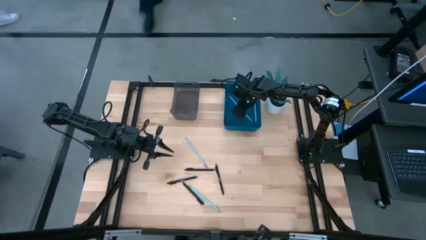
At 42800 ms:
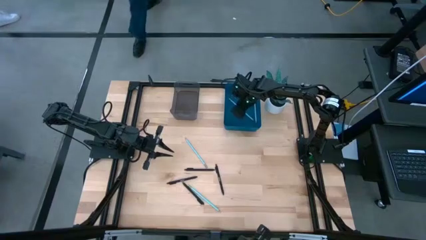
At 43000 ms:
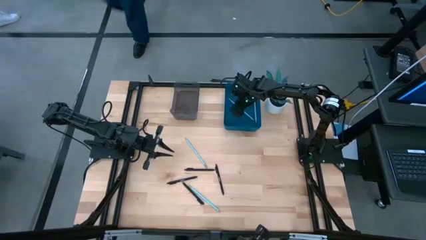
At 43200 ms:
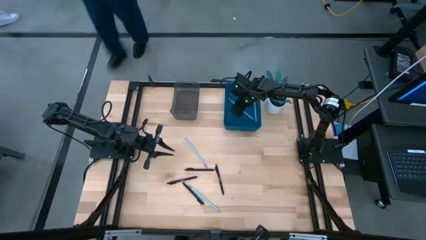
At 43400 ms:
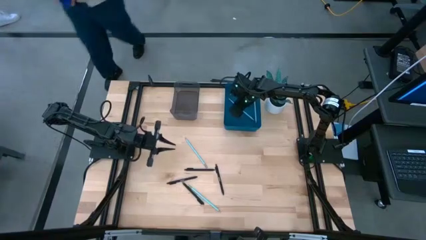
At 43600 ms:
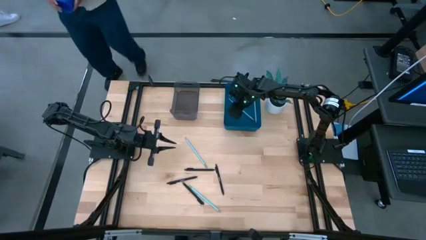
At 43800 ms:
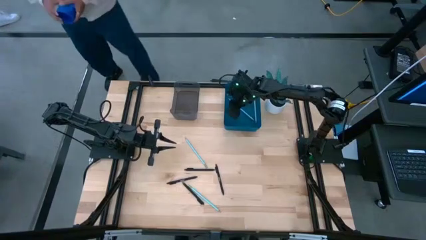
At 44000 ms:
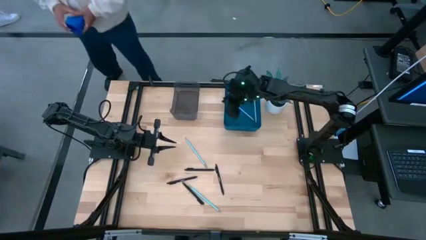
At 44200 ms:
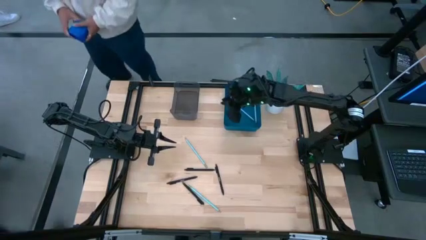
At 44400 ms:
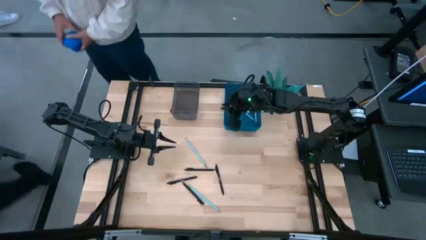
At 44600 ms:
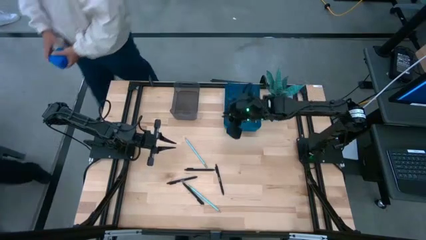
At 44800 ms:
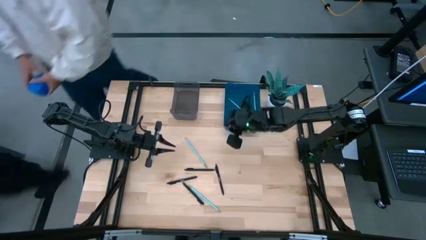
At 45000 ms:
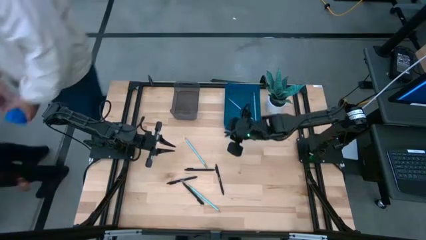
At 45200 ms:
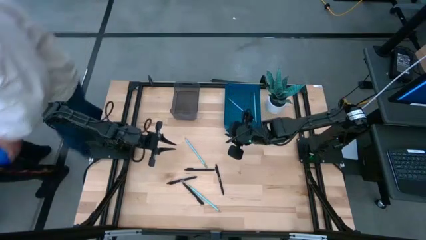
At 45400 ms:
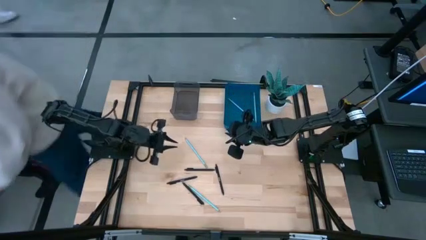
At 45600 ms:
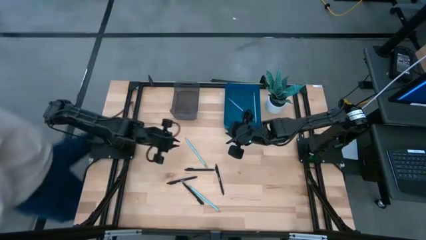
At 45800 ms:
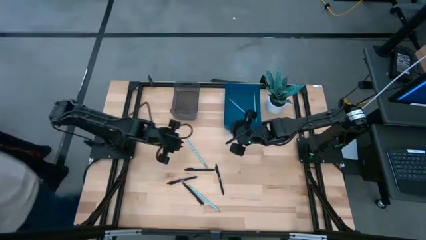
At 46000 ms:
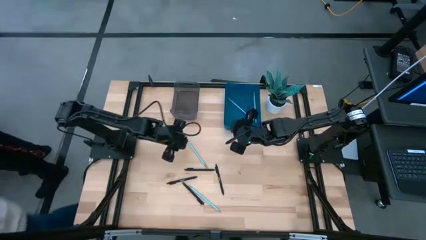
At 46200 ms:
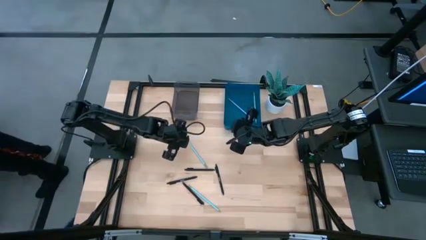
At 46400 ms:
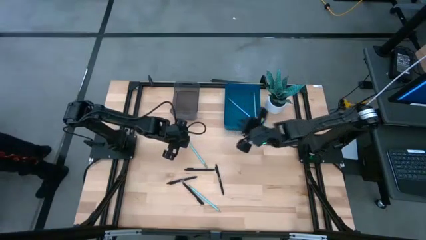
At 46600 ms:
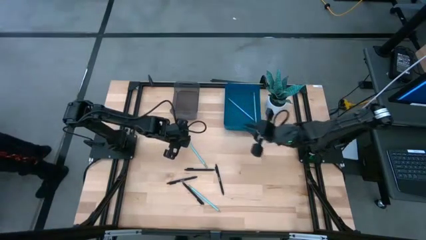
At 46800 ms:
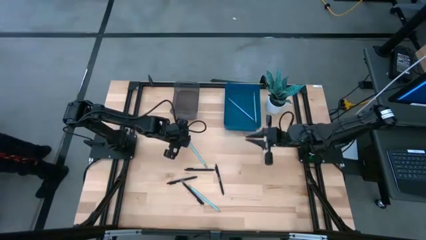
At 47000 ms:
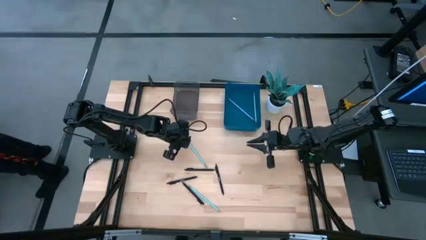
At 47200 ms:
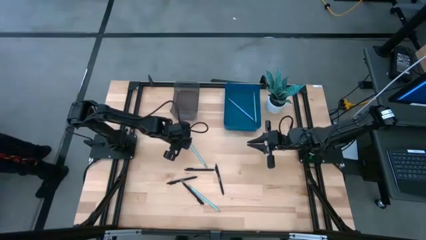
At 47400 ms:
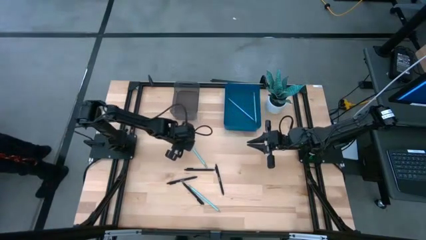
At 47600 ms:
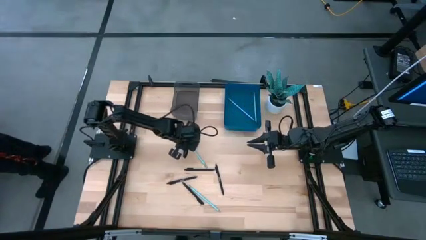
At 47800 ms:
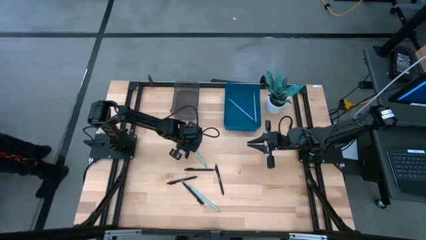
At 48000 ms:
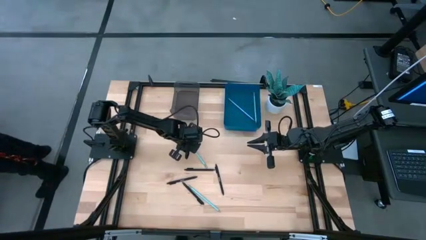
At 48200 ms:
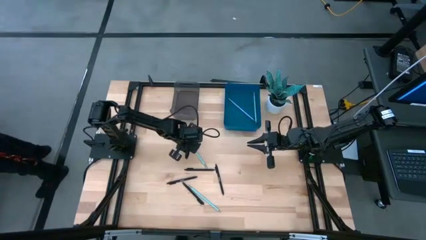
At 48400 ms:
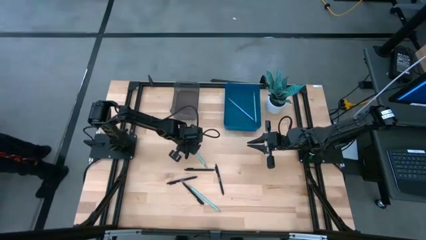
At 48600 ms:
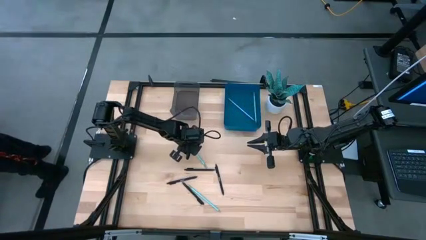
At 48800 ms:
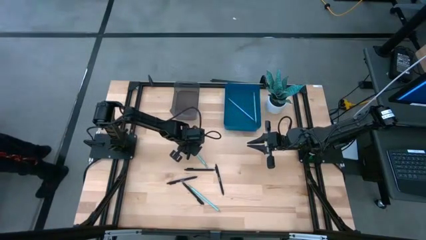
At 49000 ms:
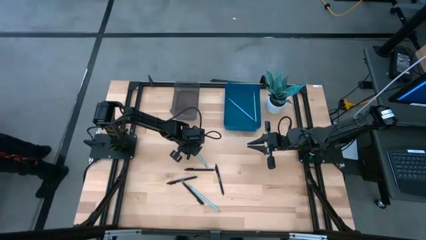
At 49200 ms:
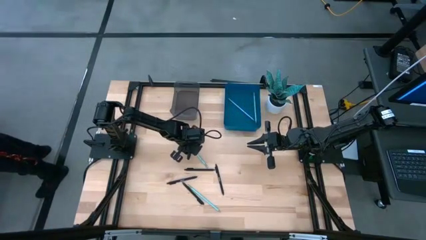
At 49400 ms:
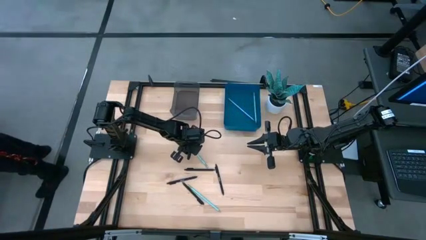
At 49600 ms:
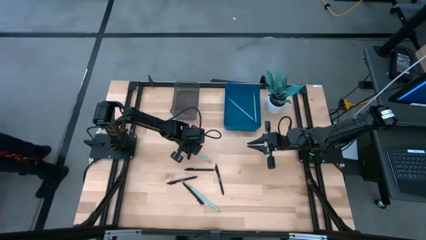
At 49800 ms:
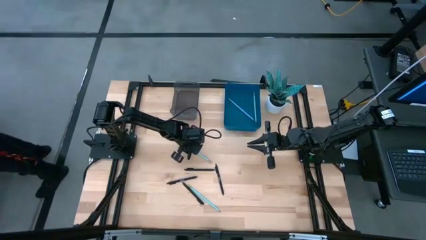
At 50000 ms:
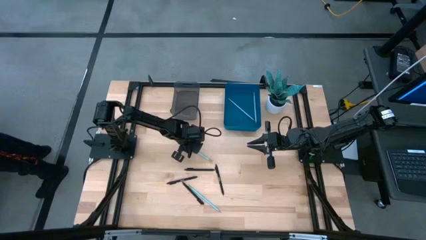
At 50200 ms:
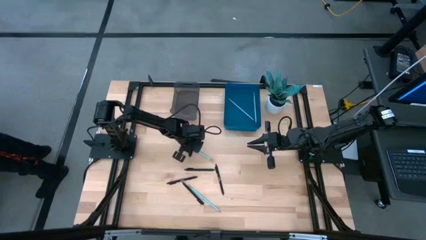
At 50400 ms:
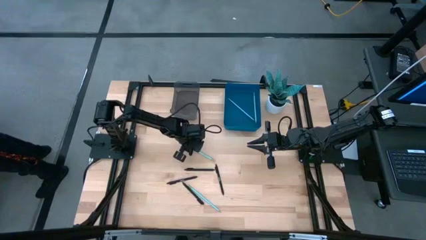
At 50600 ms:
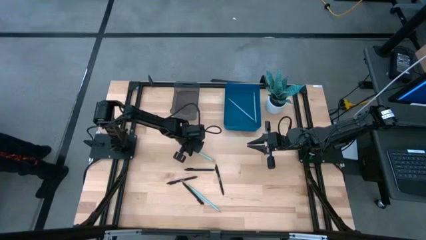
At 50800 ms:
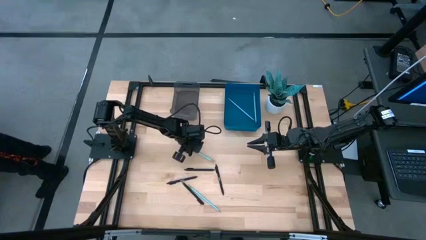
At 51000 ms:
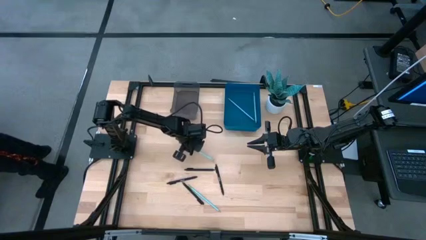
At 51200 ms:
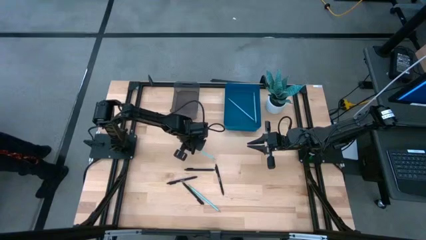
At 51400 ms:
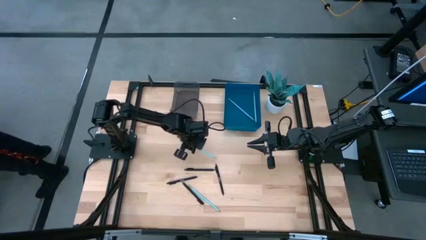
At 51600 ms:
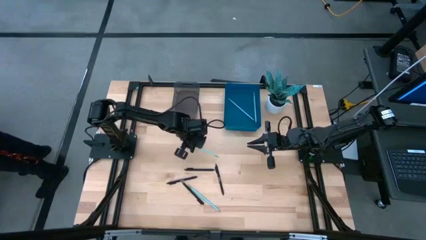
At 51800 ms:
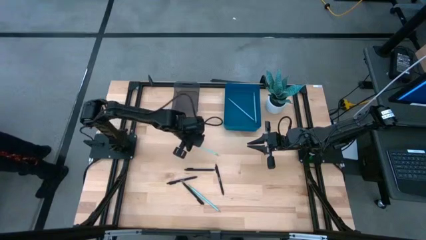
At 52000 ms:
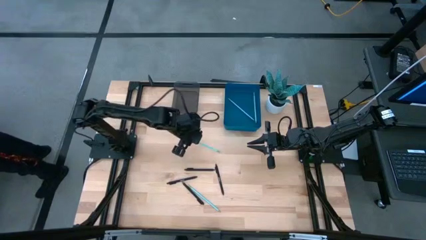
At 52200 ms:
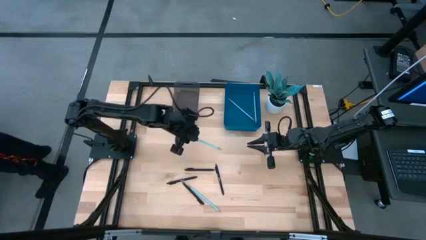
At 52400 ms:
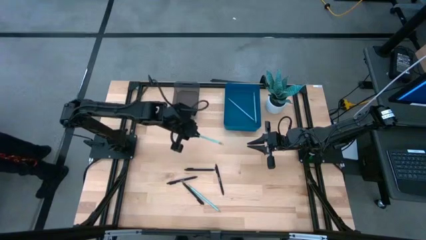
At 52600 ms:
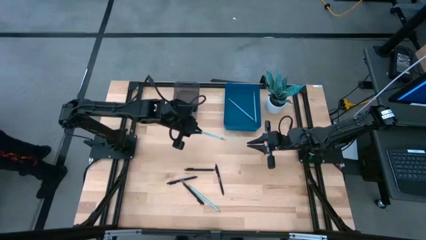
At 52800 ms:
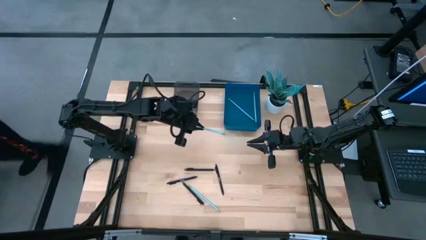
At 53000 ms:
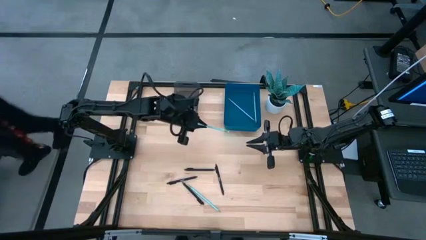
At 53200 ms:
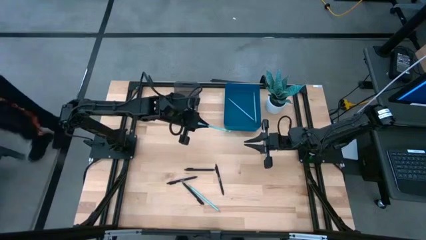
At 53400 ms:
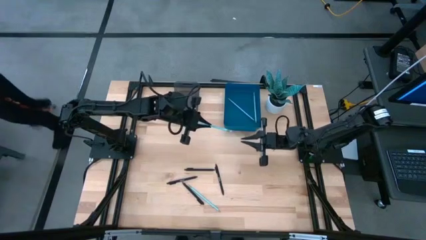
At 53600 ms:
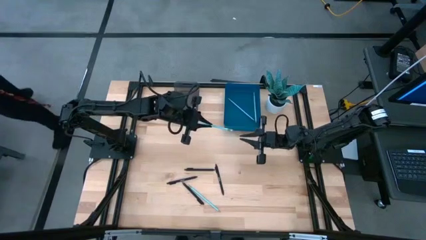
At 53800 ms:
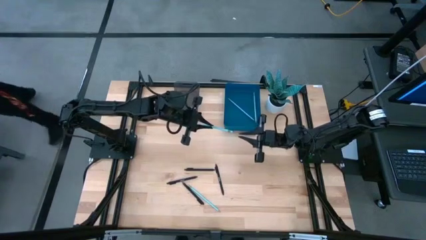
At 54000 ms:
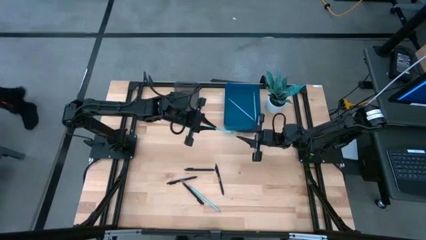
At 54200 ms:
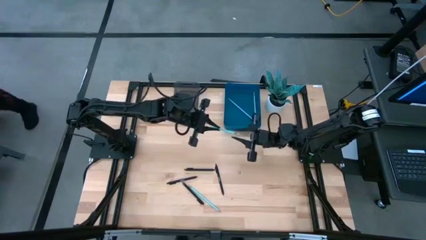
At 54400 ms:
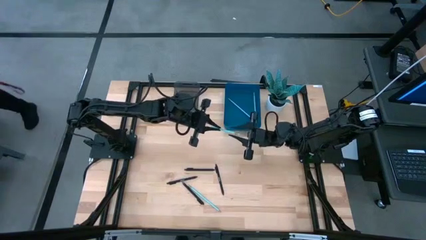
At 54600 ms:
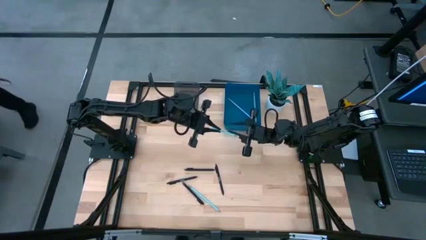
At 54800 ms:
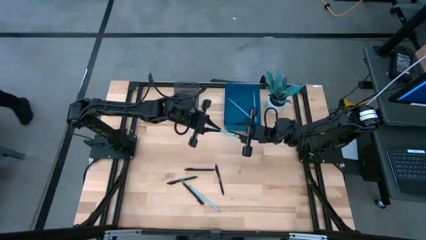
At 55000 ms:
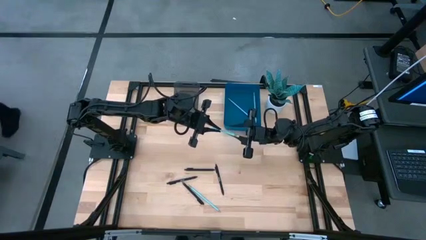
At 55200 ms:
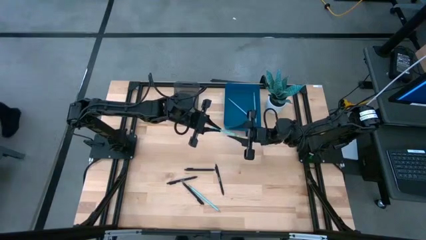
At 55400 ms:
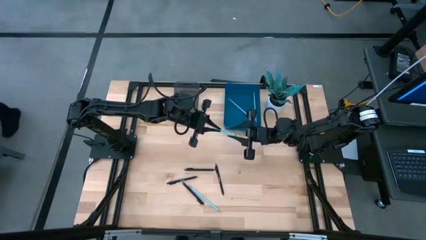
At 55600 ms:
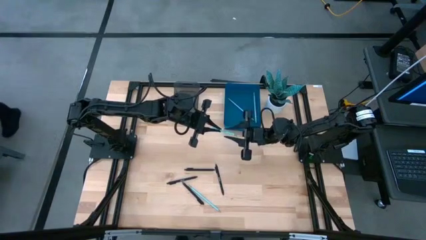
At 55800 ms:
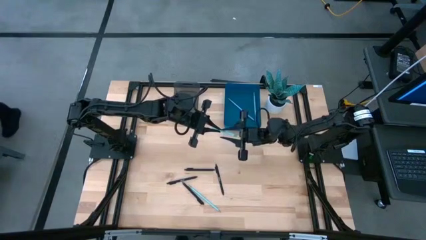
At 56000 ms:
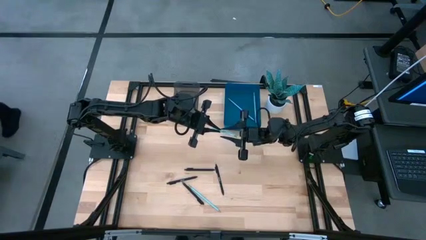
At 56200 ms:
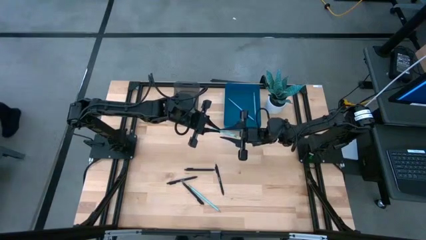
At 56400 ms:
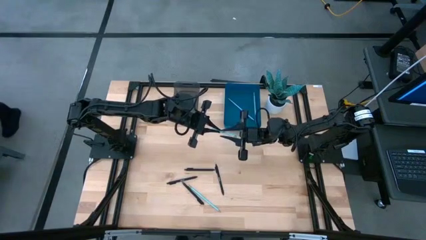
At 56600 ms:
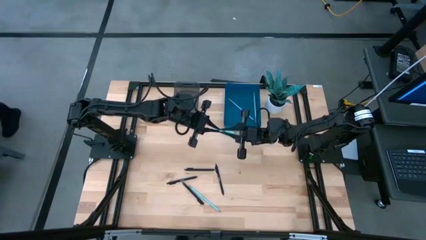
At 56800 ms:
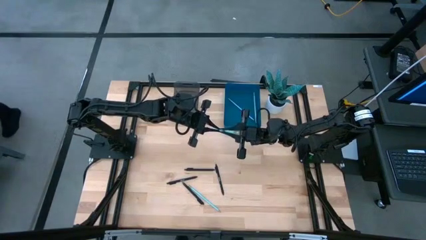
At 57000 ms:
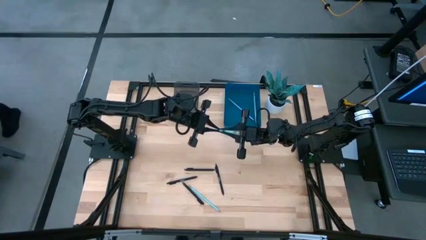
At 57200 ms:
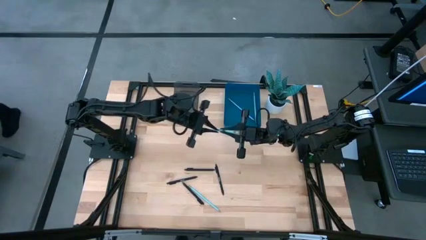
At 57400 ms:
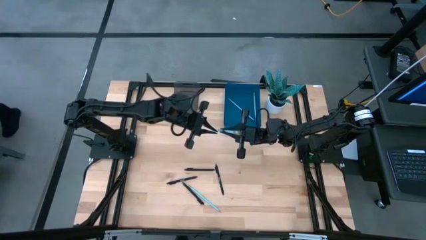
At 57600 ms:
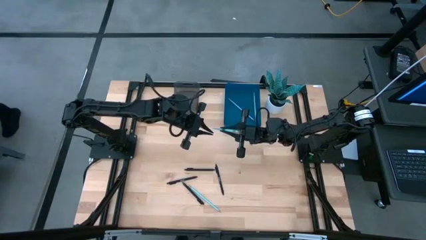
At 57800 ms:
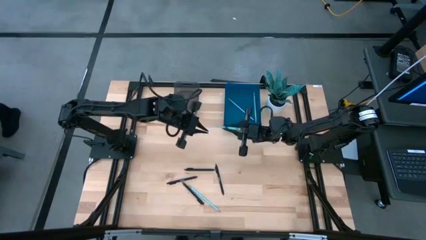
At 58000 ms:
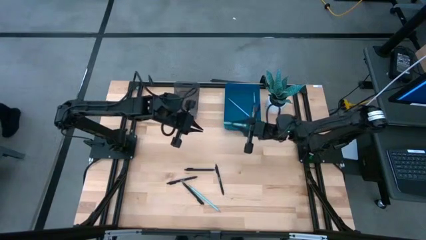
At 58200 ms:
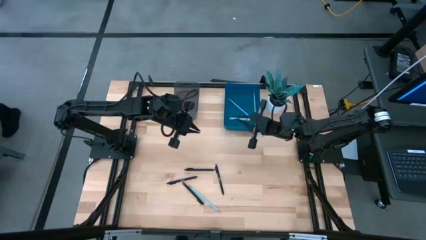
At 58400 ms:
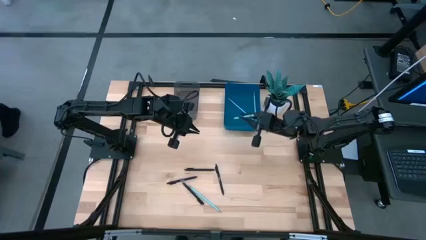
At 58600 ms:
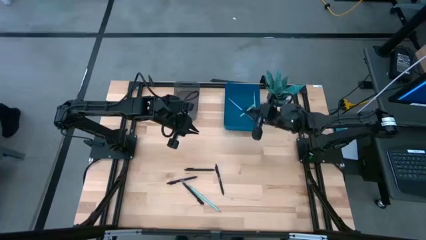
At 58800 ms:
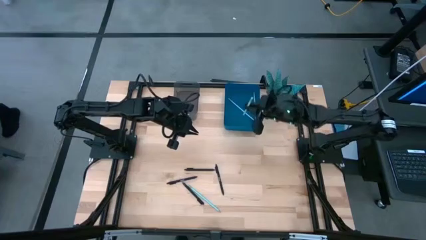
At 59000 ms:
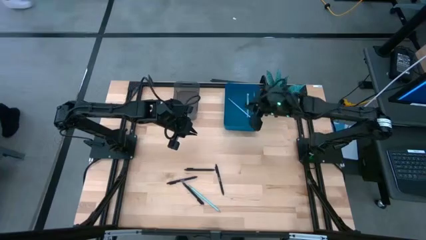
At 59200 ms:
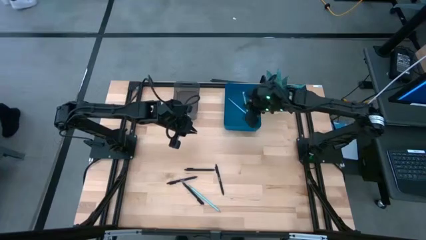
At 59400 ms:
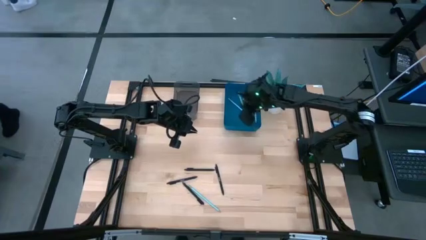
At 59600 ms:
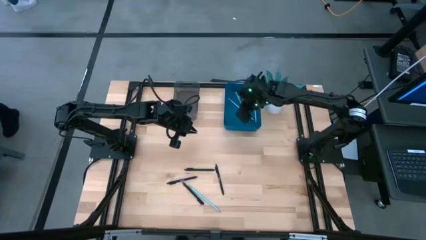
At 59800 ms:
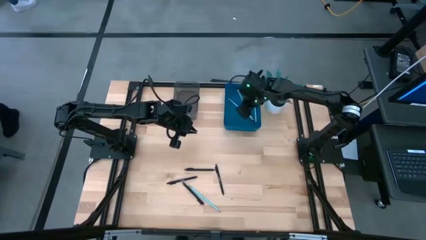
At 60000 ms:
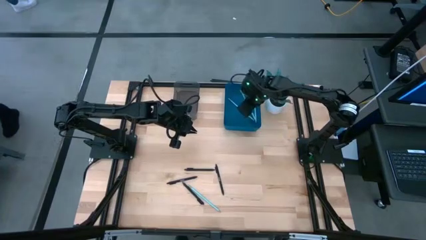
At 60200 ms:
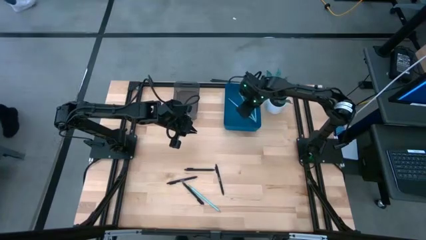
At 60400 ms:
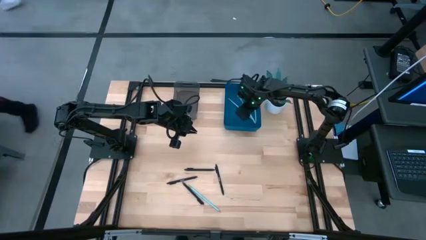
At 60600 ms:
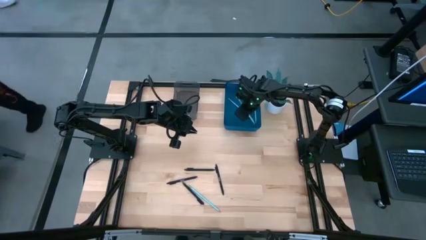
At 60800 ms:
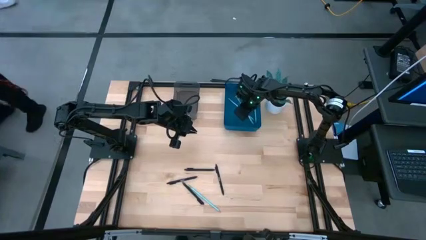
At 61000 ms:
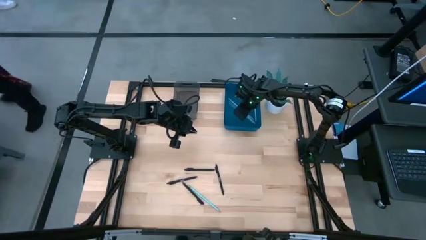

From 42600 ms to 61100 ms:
Task: Sort pens & pencils
Put the light blue pencil into the blue bin
